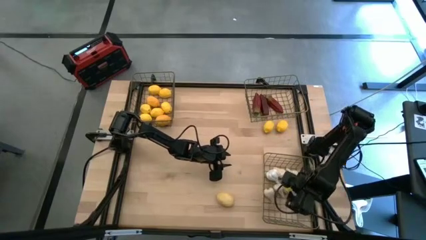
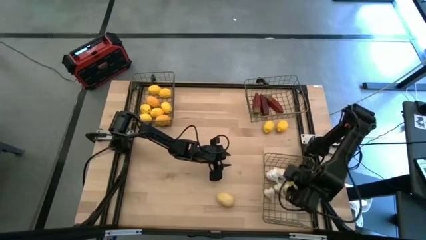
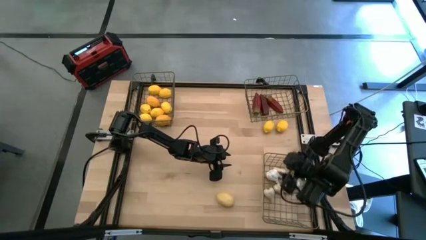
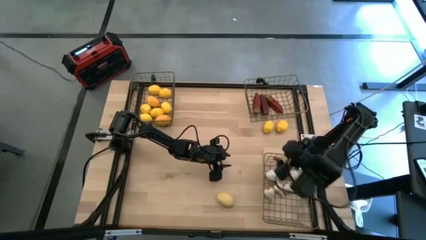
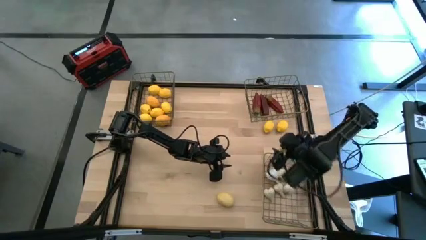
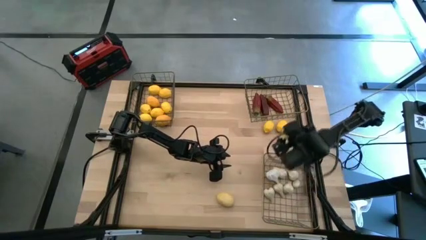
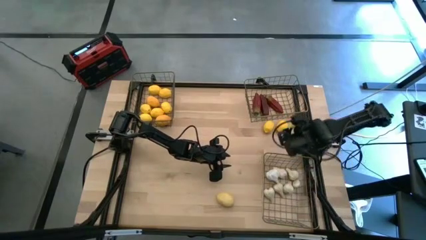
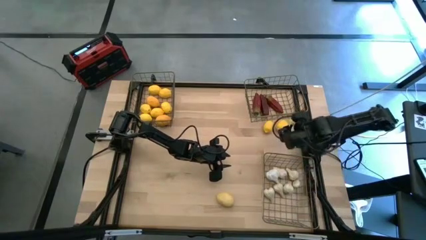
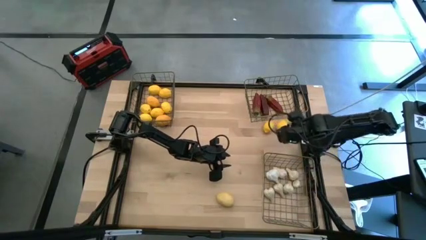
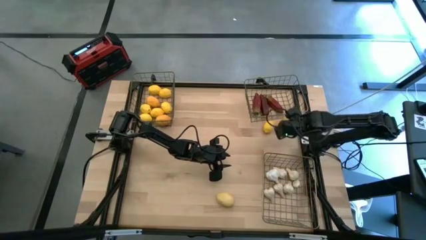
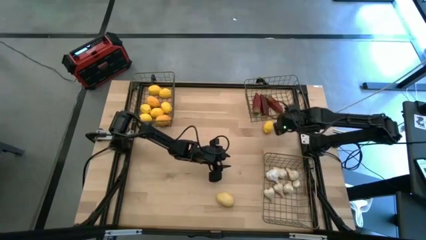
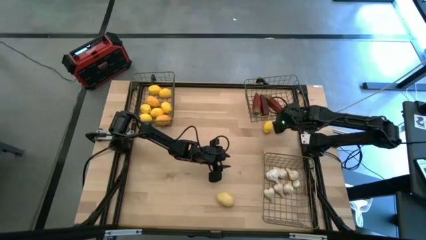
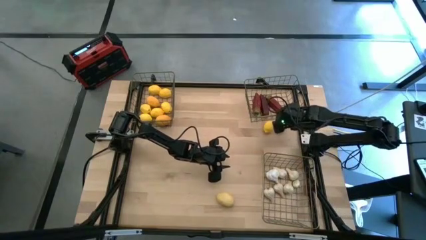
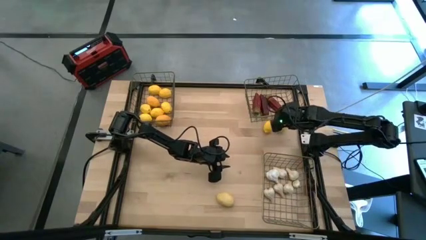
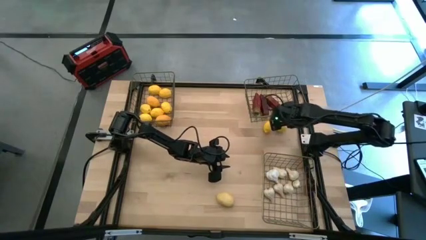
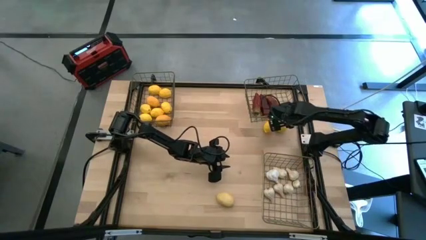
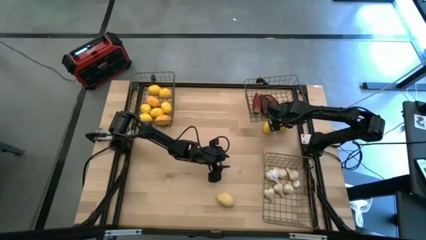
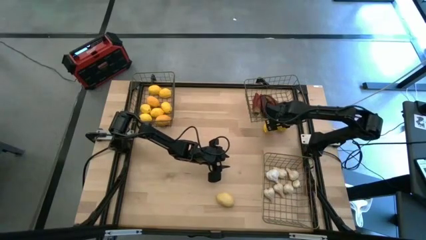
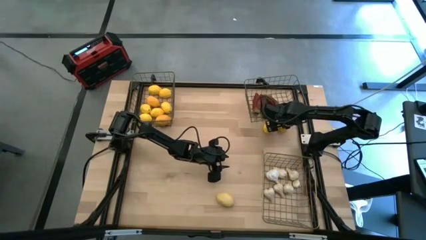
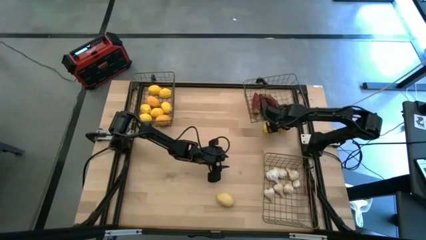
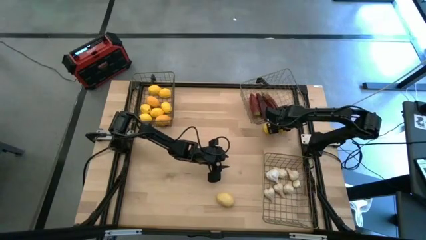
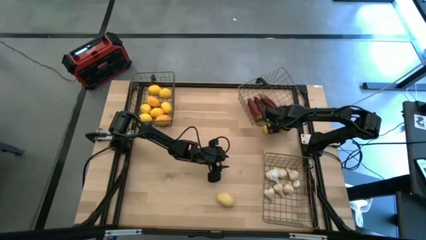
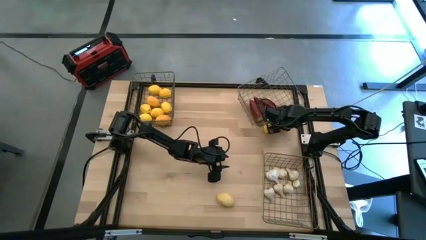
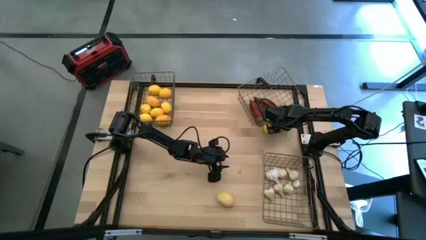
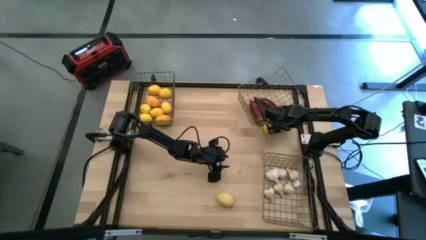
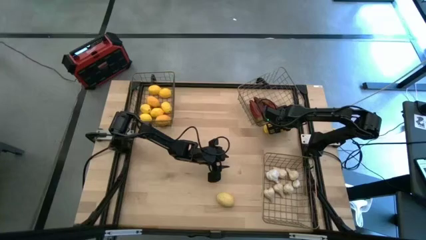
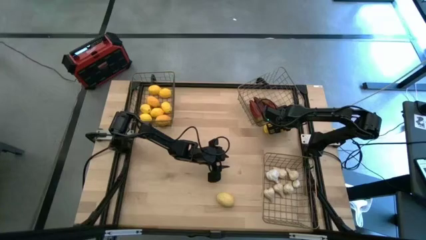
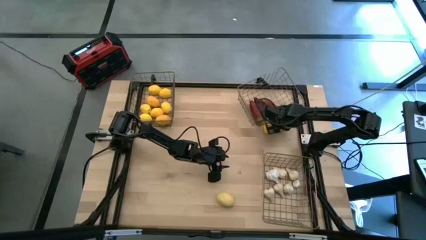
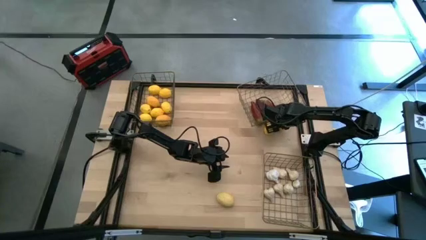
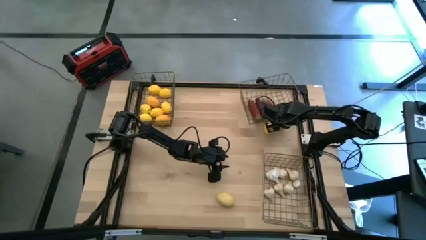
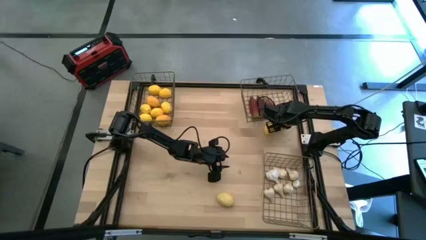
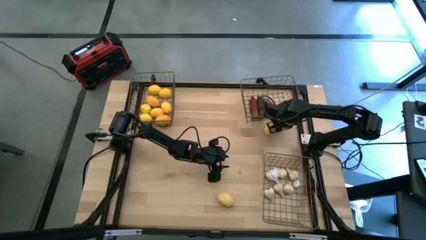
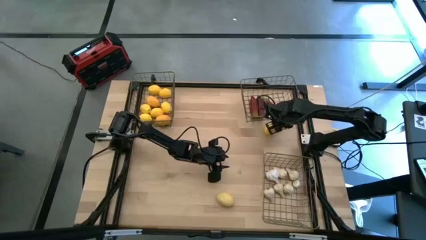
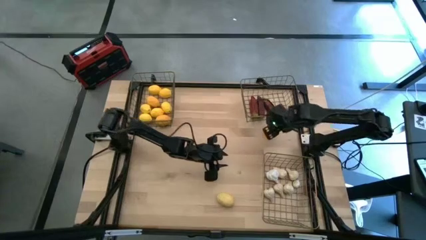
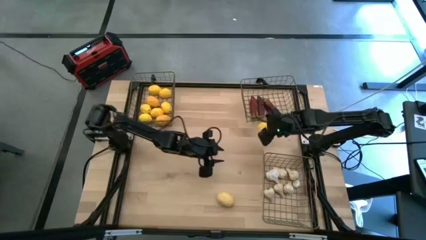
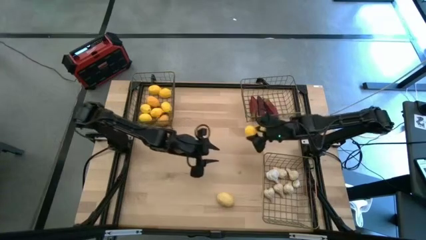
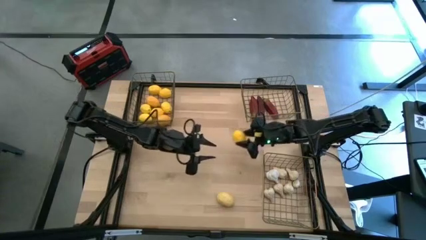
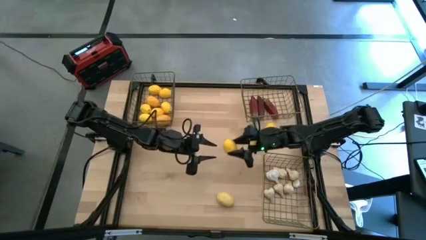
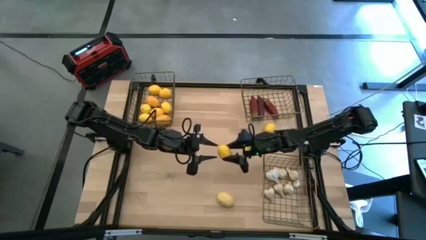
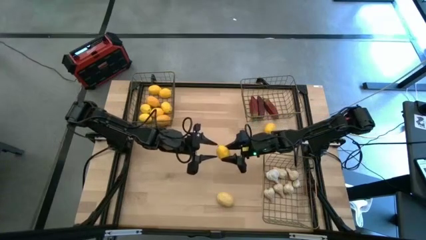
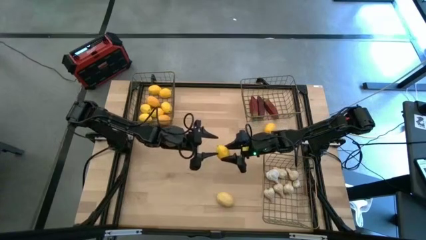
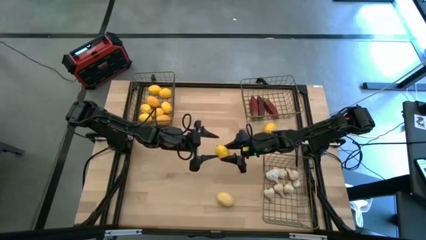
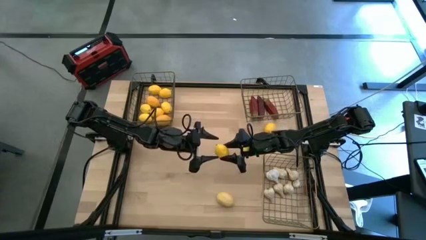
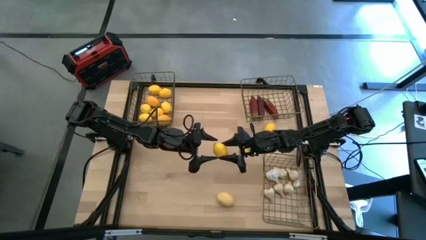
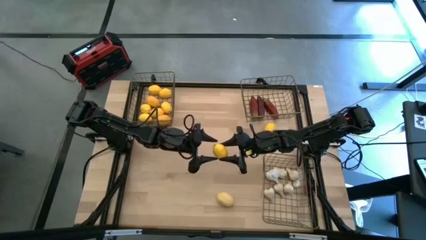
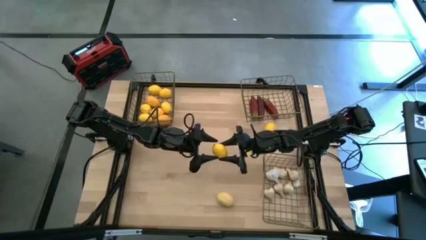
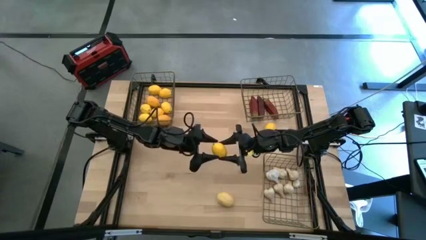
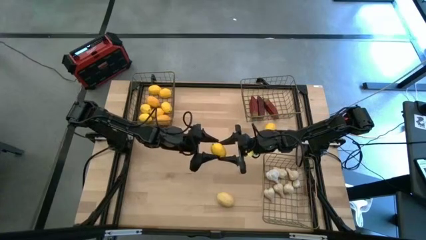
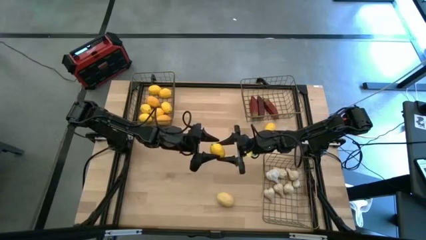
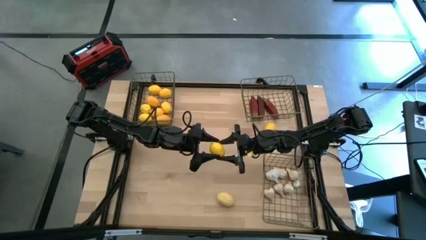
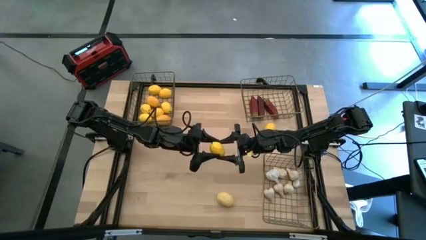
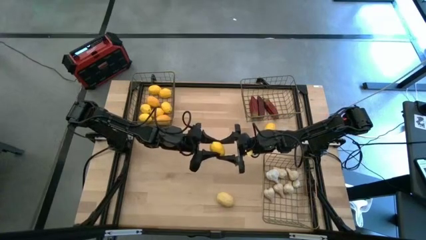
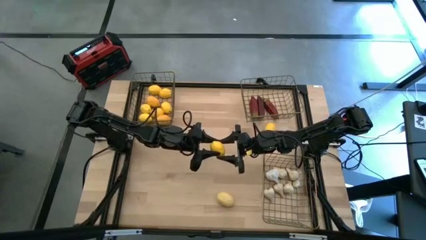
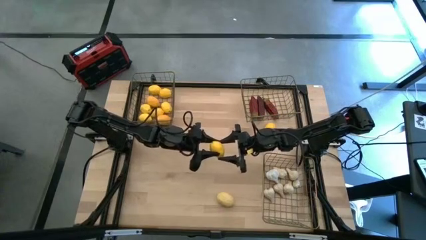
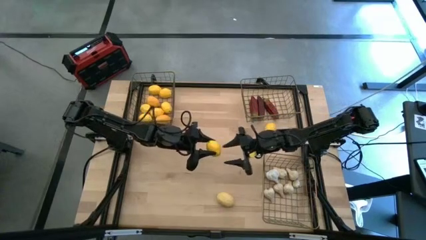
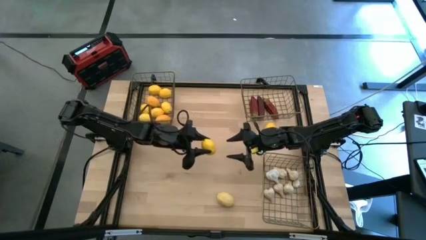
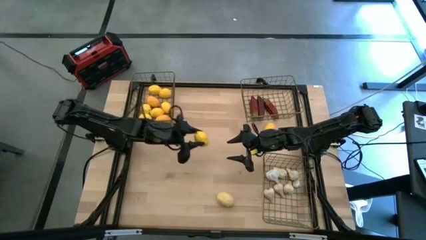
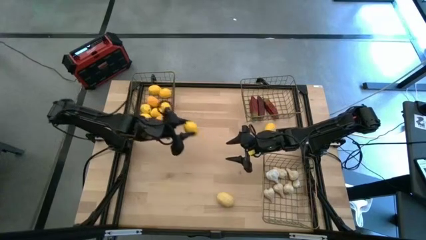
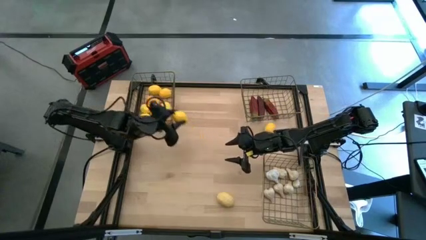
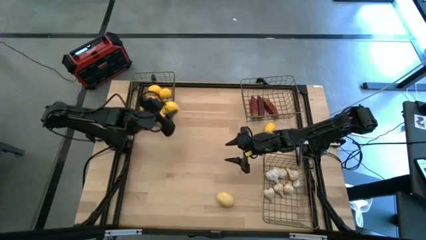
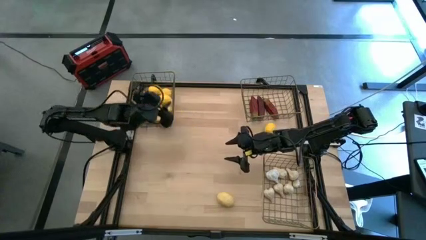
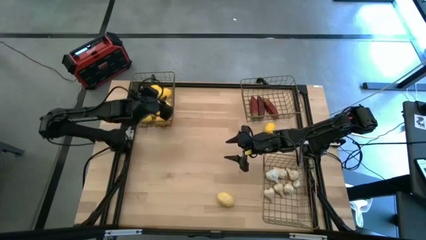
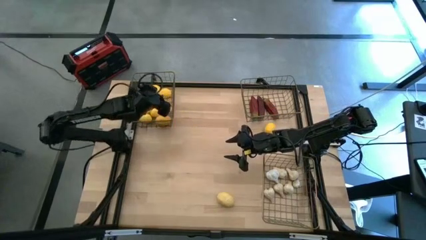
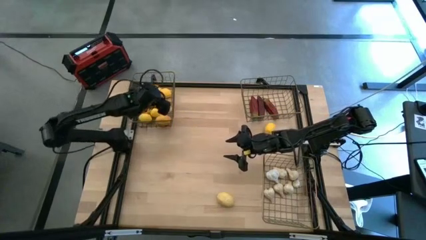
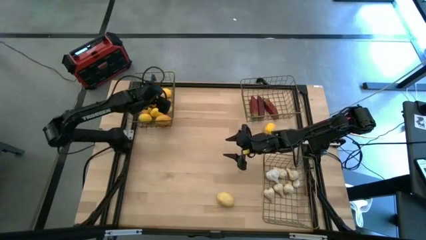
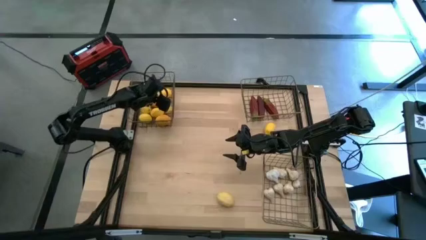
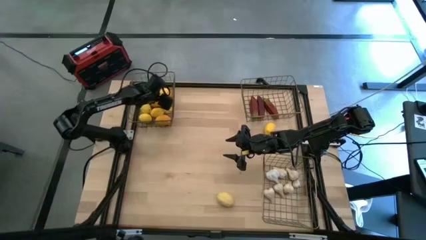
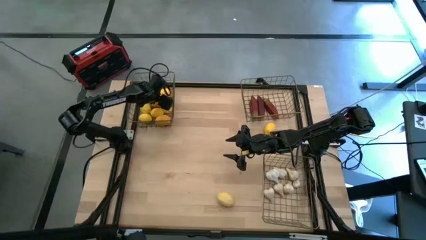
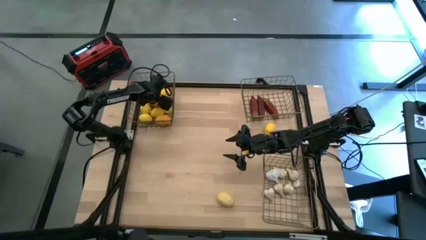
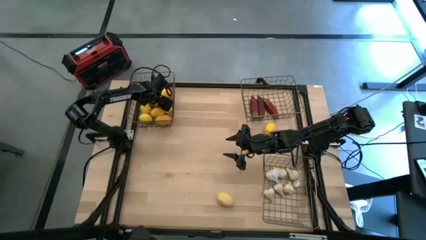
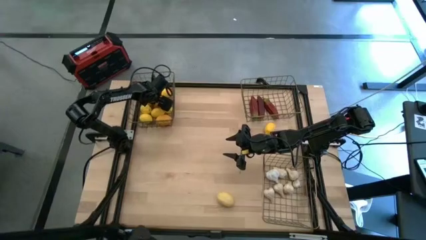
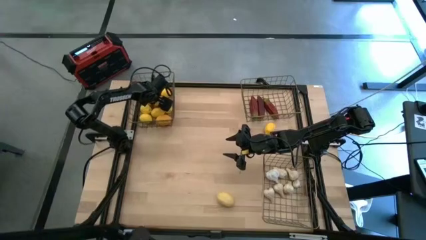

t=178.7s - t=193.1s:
Task: Sort produce into baskets
Put the yellow lemon into the top left wire basket
